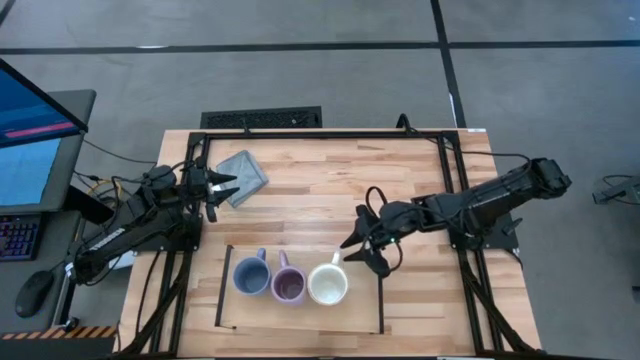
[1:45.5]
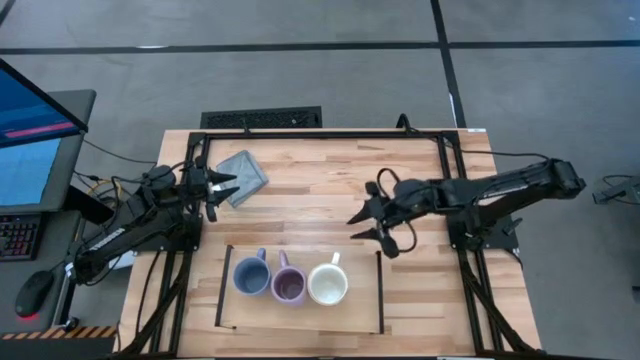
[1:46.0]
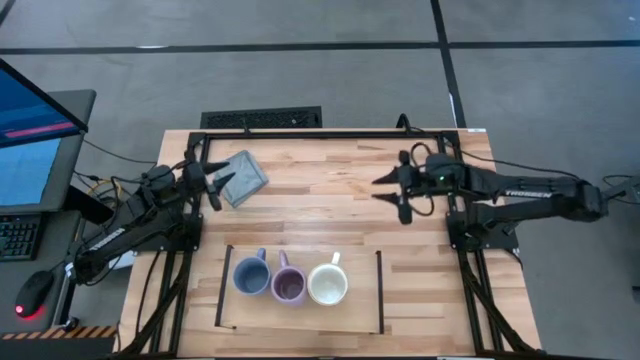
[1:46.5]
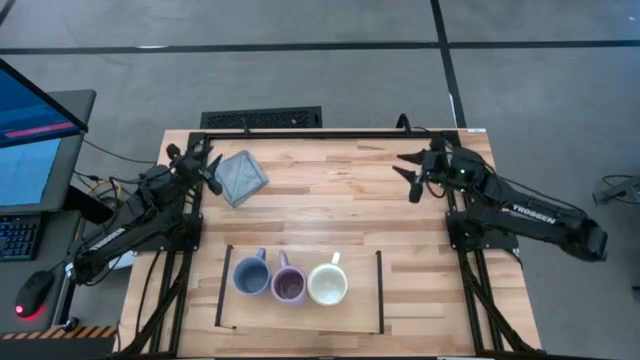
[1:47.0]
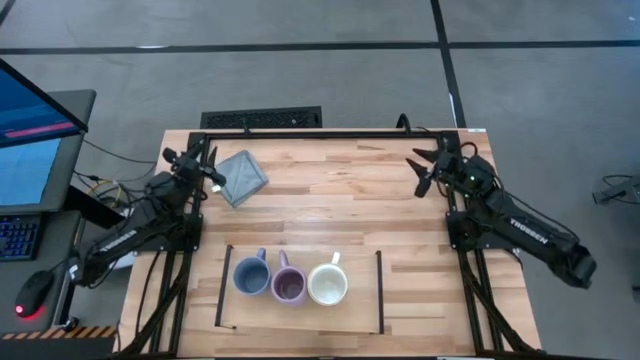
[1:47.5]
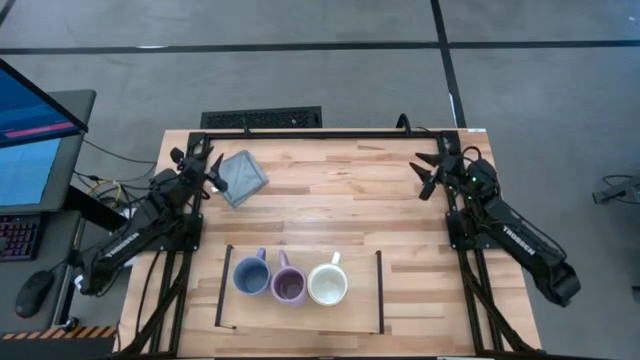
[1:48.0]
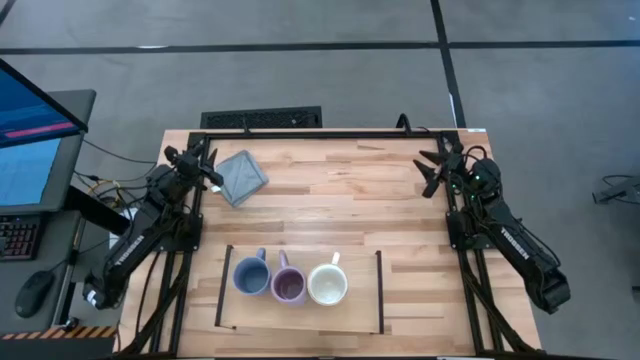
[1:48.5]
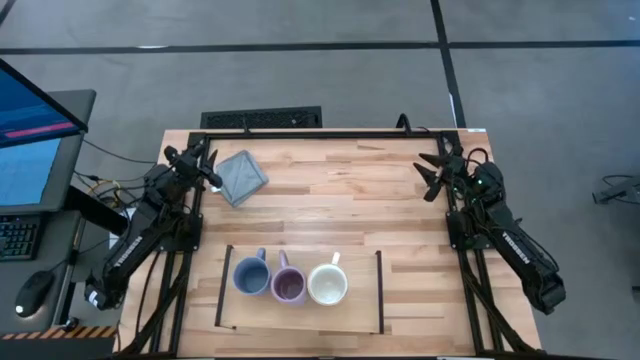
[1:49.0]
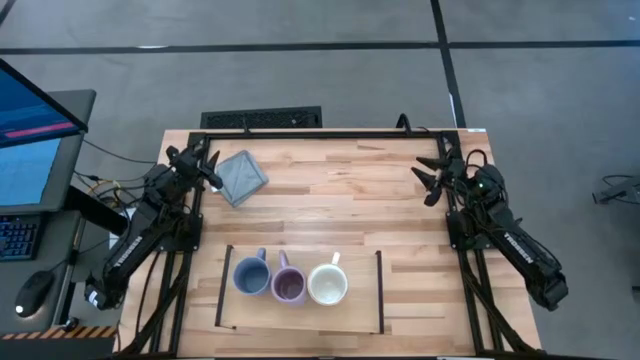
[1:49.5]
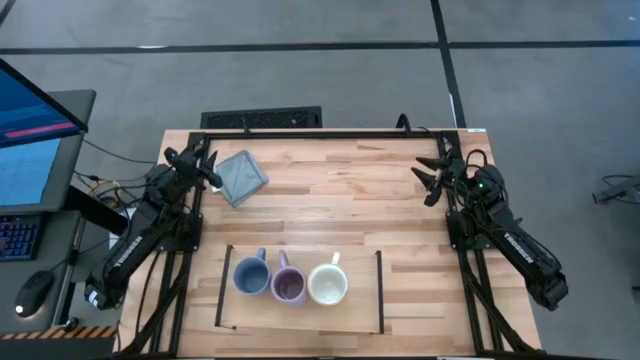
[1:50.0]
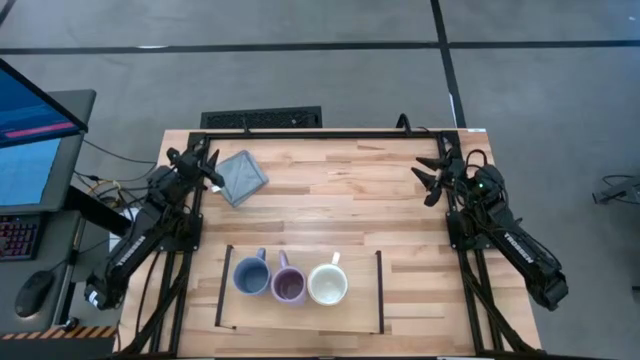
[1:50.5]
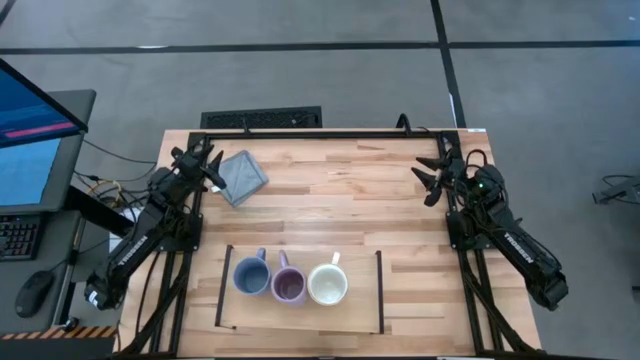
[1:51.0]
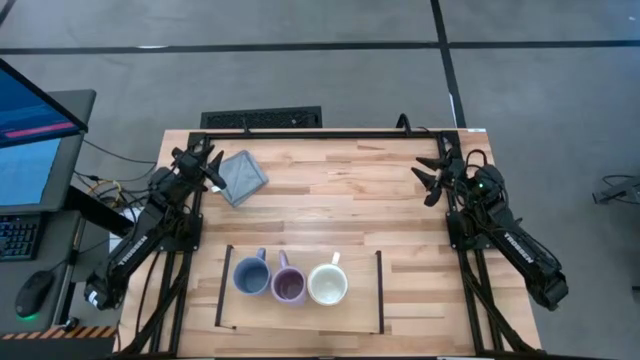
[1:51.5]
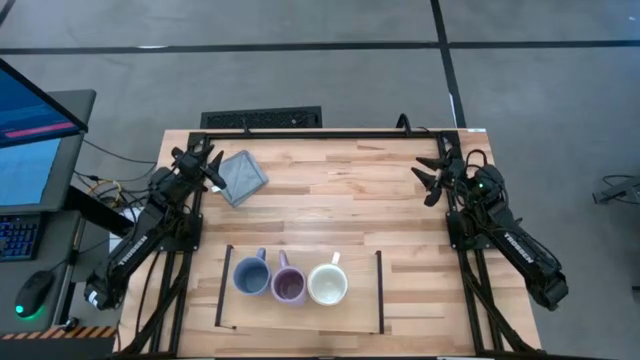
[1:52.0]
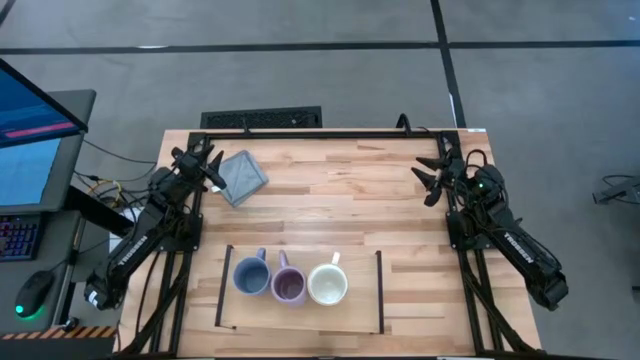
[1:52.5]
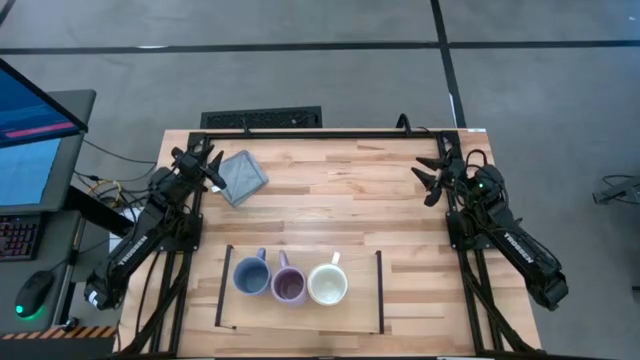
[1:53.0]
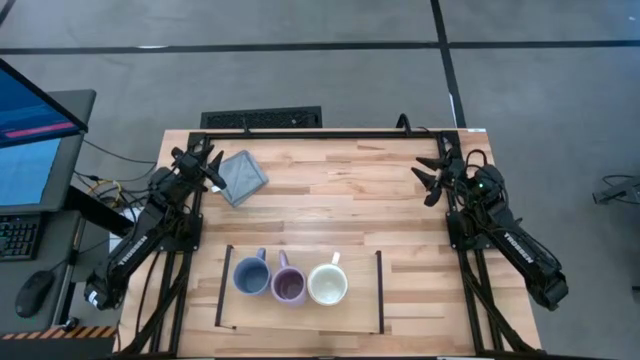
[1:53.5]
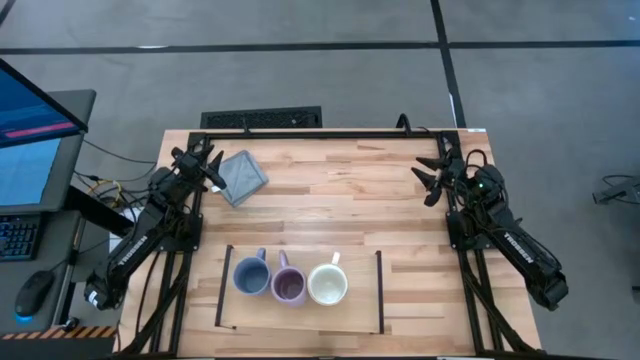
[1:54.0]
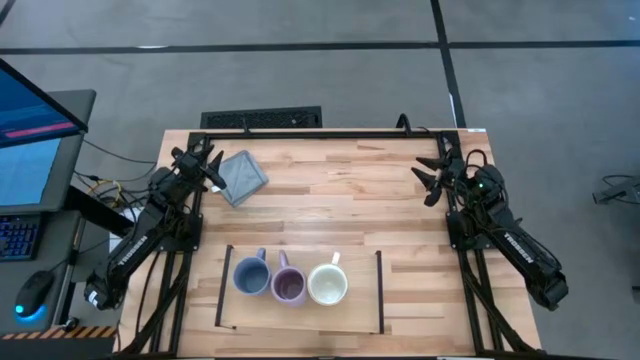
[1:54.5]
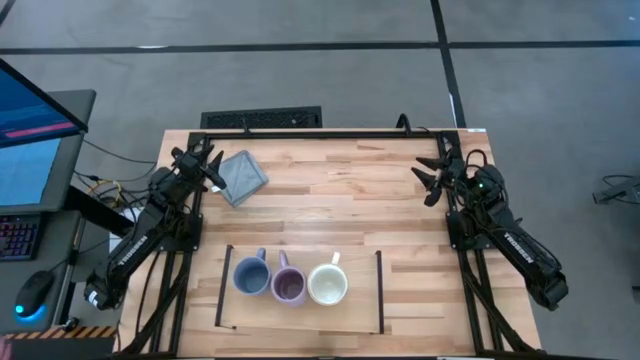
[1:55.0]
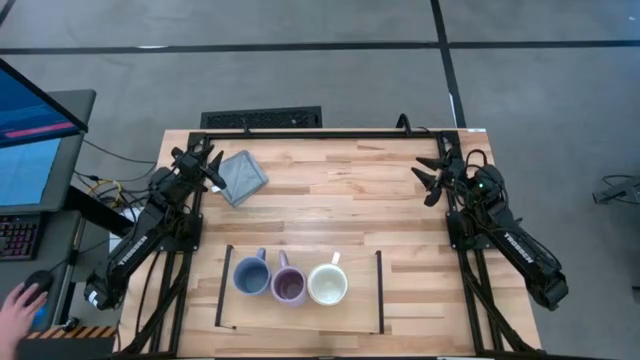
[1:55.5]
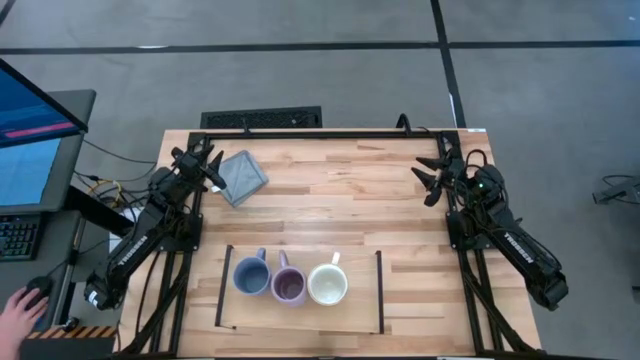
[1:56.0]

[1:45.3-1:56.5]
Task: Stack small to large cups/mugs on shelf
Return to Home Position

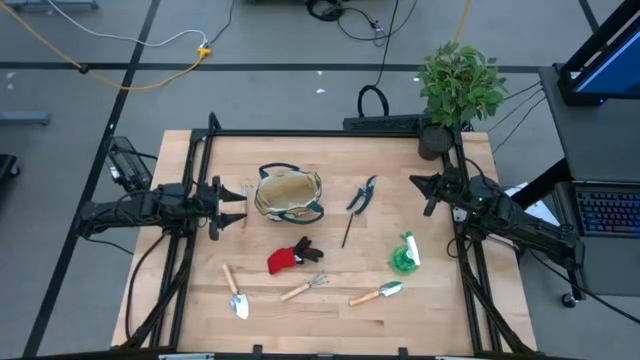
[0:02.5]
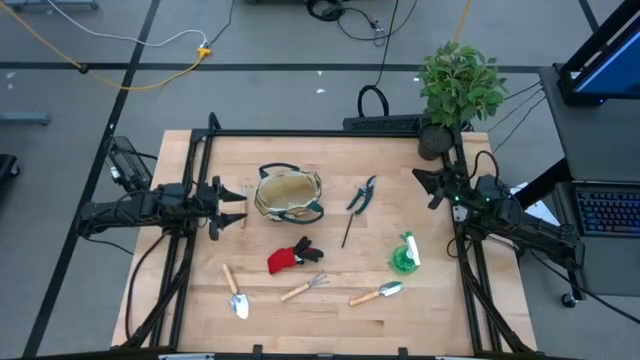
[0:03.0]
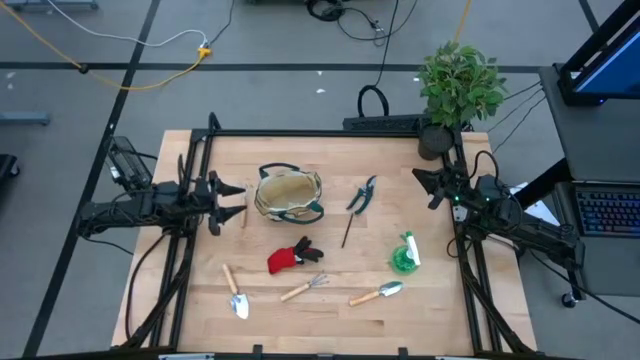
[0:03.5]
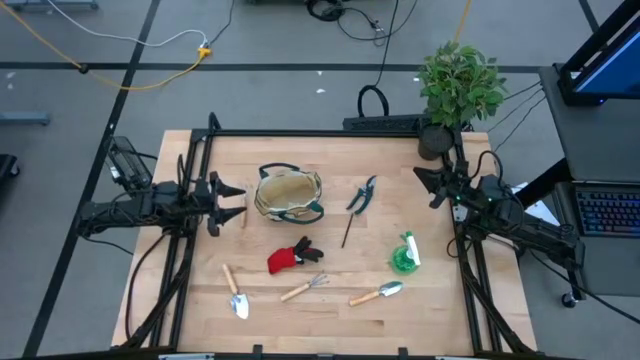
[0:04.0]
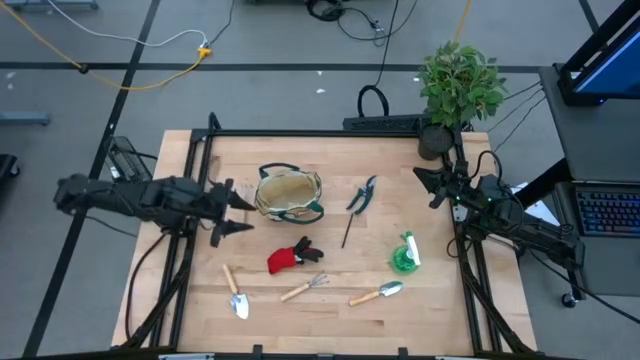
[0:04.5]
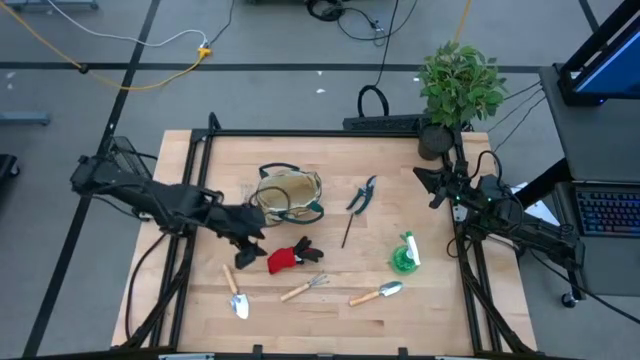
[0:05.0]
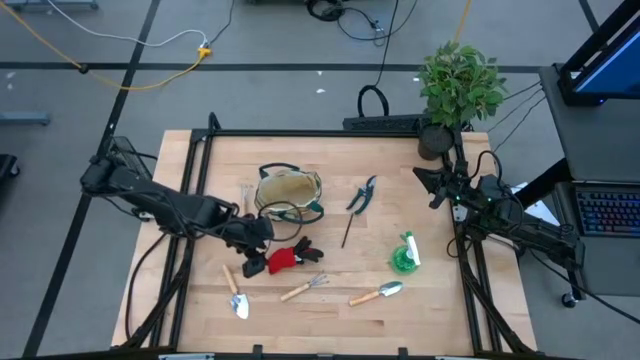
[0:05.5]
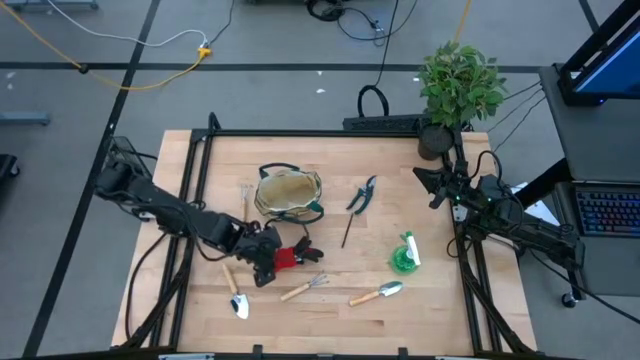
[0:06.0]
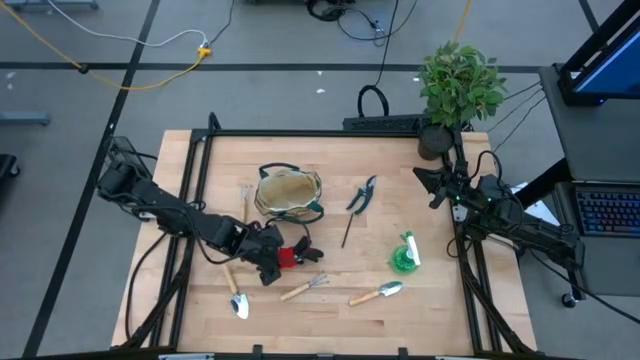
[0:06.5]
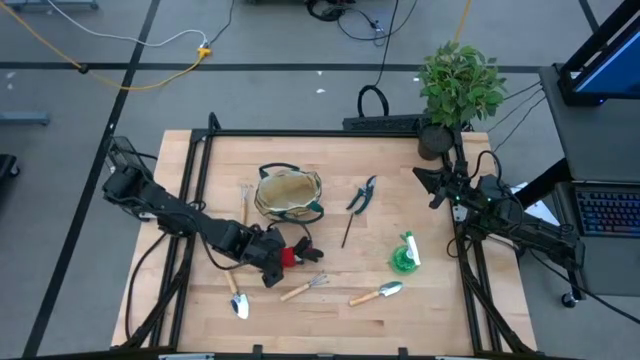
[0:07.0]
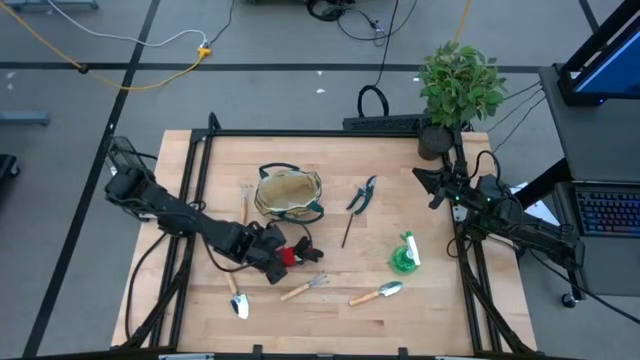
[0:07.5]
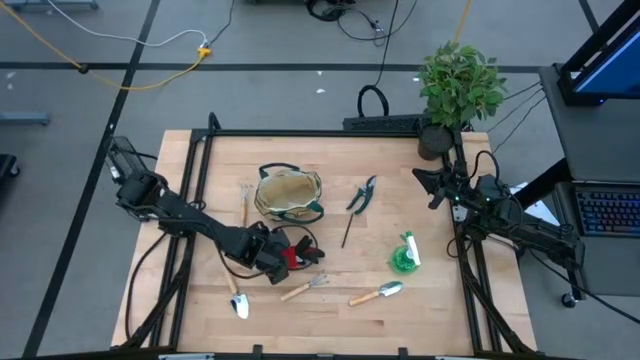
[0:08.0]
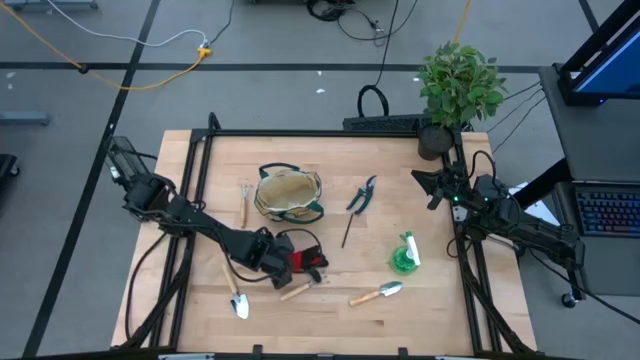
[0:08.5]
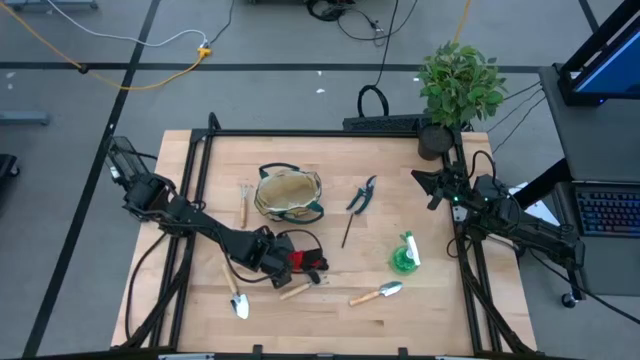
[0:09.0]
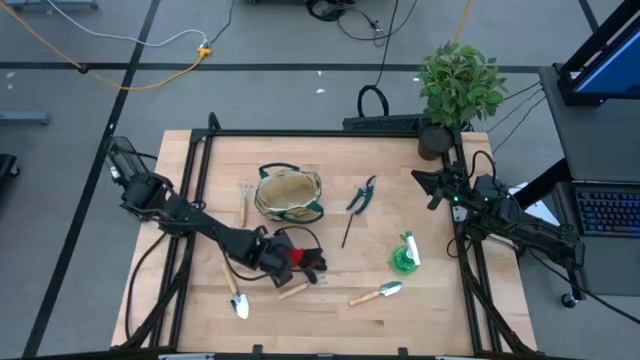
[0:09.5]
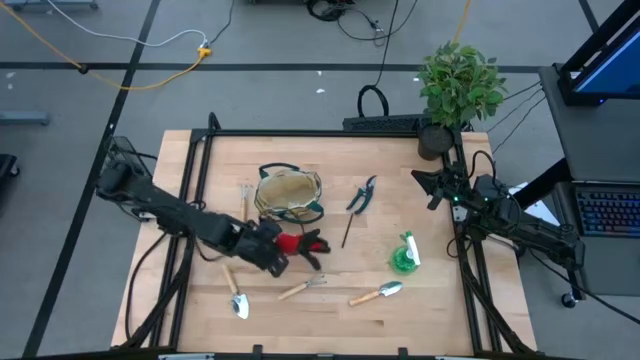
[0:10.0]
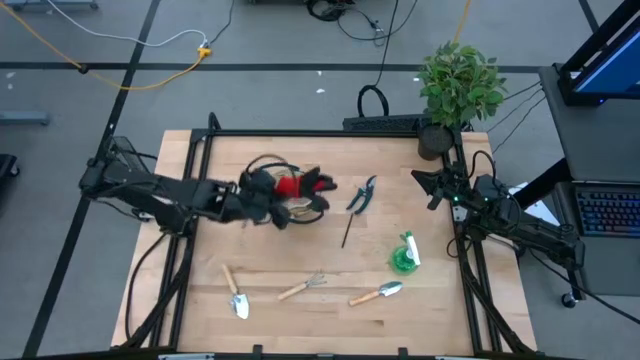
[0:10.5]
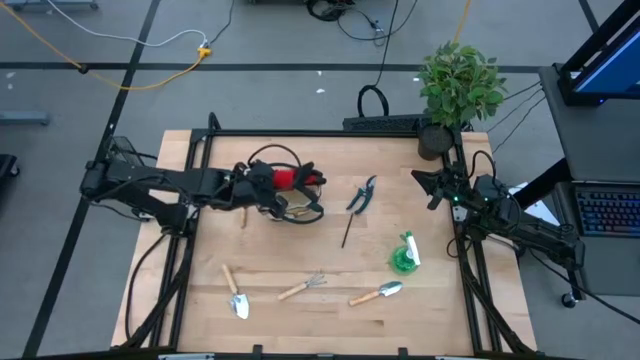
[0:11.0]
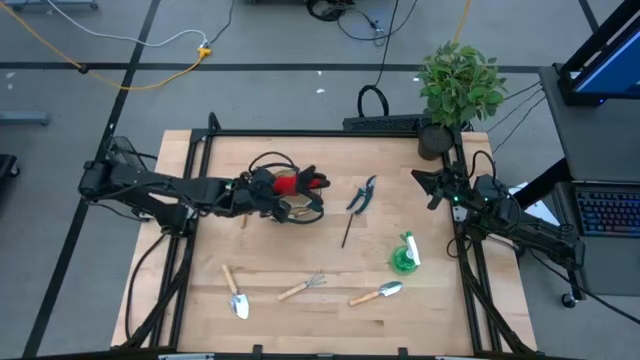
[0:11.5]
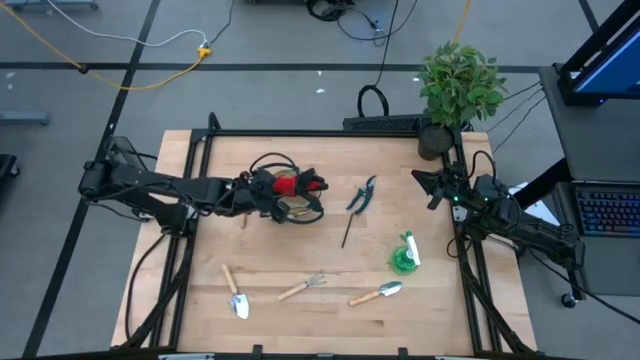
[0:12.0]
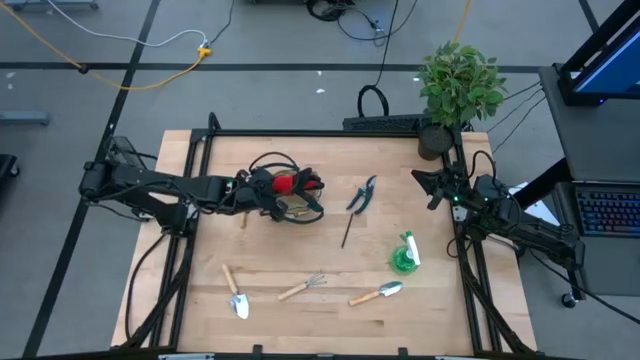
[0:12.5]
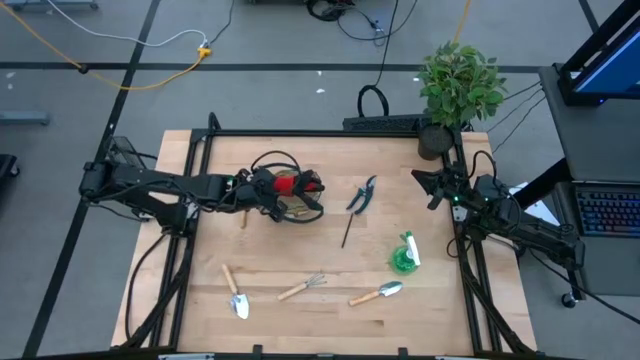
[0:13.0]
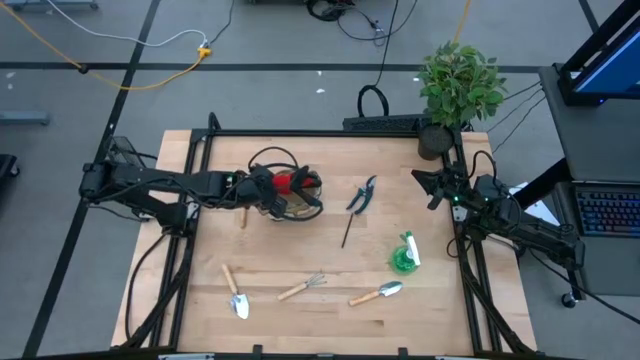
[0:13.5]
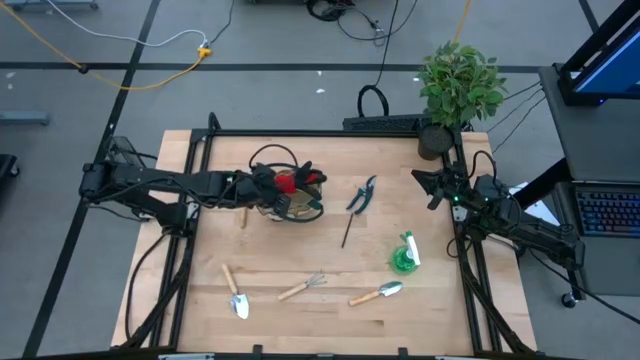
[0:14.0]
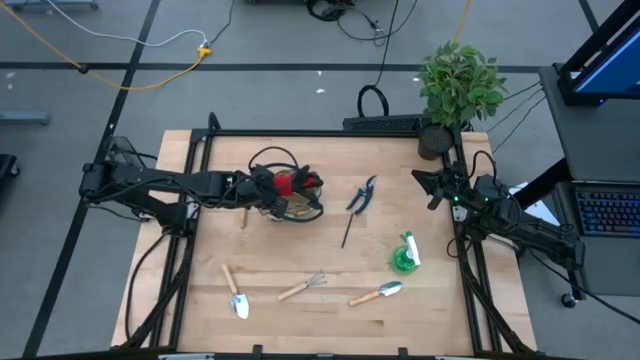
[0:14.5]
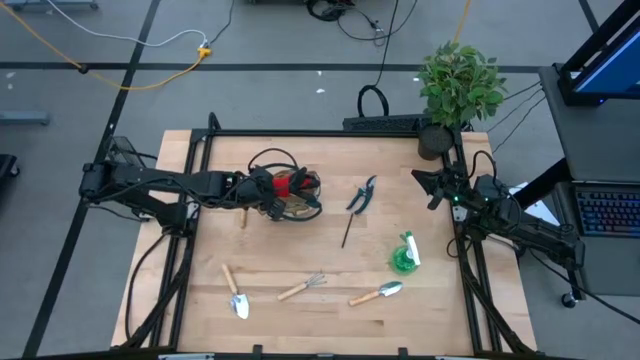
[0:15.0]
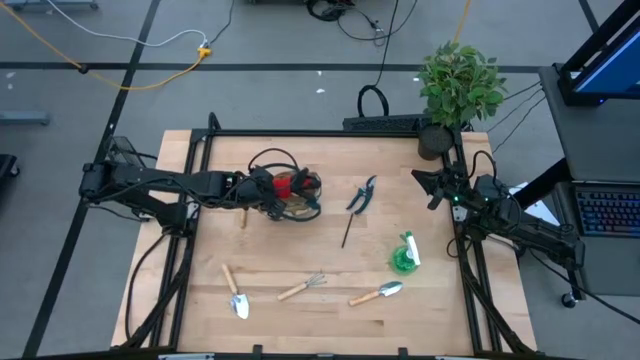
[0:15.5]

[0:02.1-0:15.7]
Task: Pick & Place Garden tools in Gardening bag
Put the red gloves into the gardening bag
